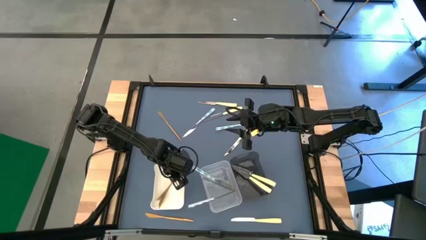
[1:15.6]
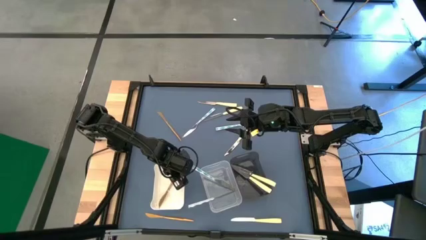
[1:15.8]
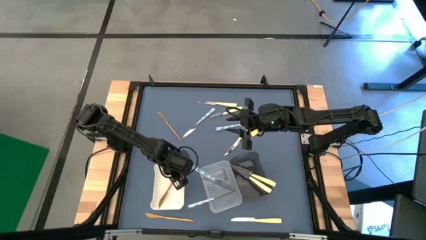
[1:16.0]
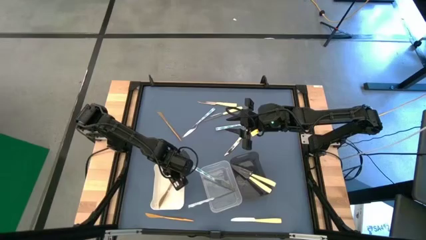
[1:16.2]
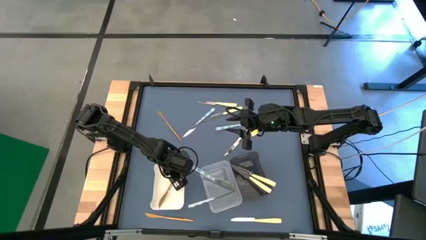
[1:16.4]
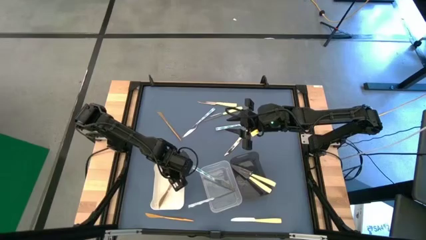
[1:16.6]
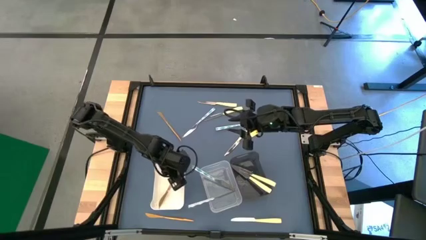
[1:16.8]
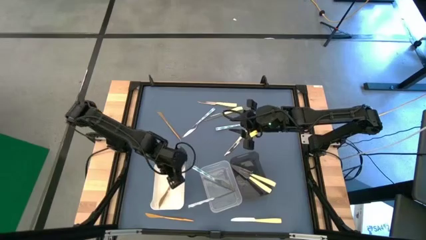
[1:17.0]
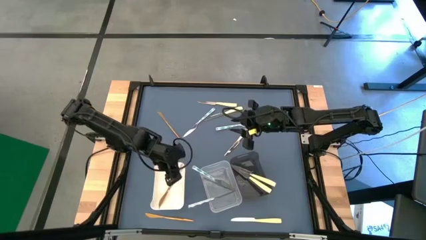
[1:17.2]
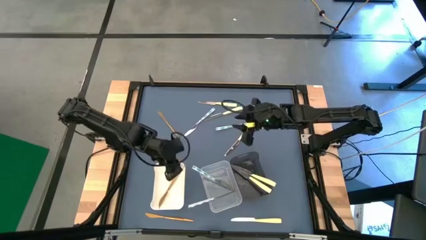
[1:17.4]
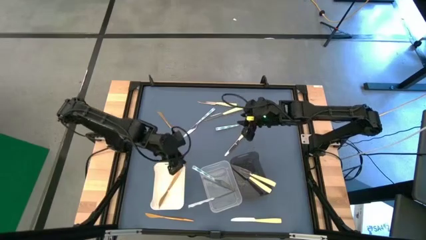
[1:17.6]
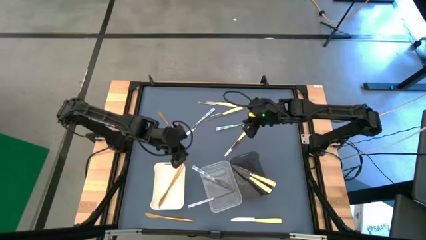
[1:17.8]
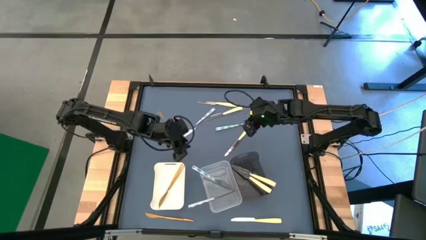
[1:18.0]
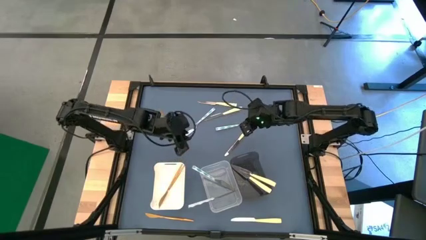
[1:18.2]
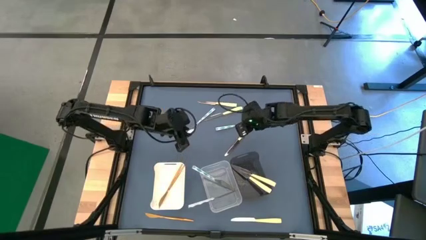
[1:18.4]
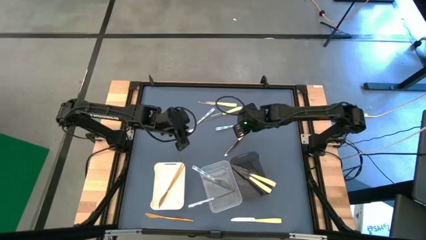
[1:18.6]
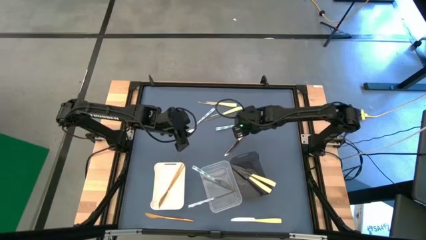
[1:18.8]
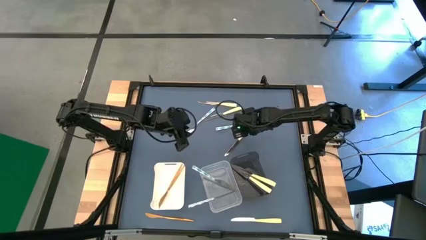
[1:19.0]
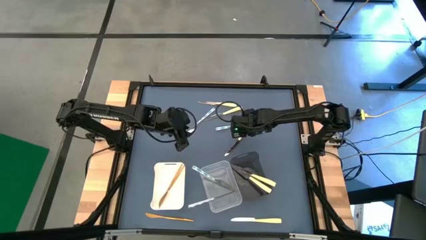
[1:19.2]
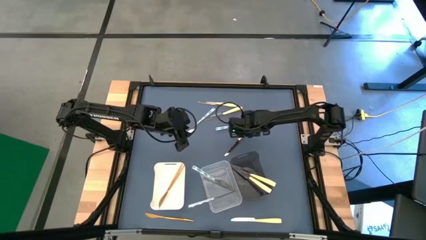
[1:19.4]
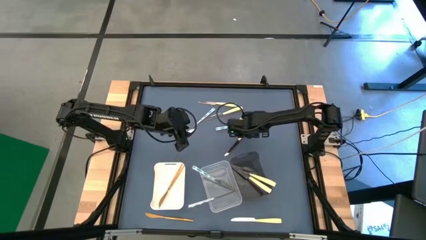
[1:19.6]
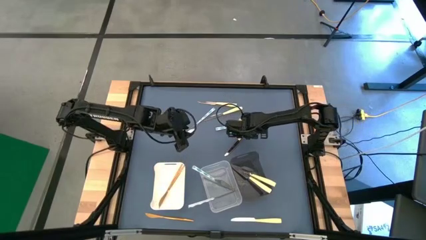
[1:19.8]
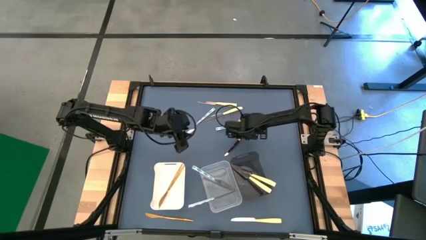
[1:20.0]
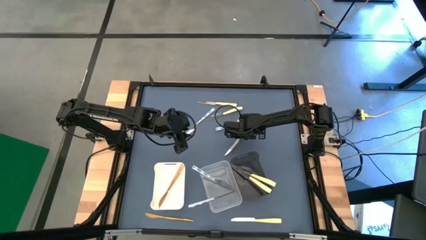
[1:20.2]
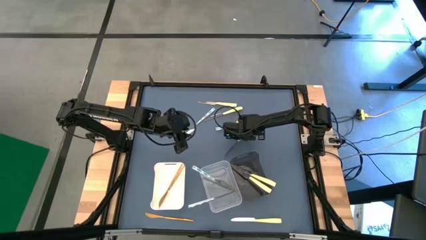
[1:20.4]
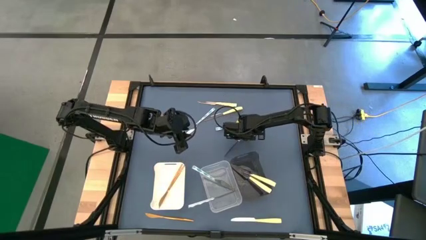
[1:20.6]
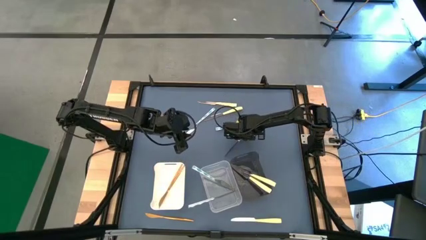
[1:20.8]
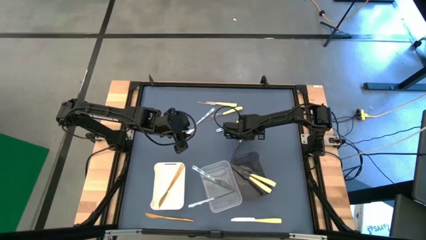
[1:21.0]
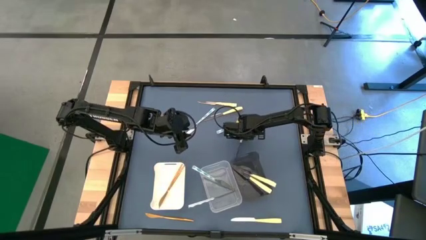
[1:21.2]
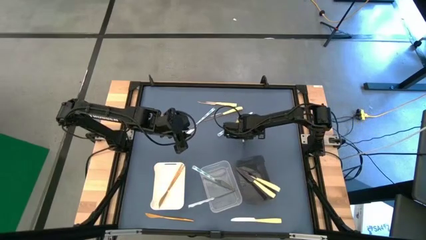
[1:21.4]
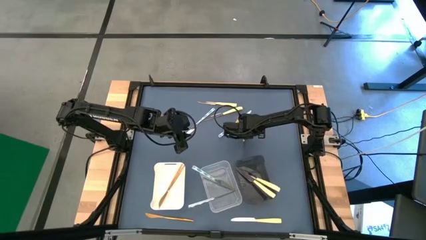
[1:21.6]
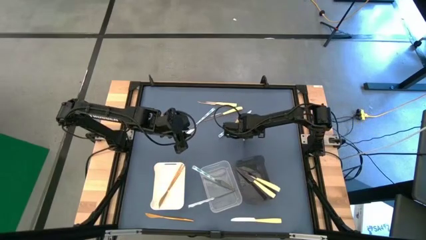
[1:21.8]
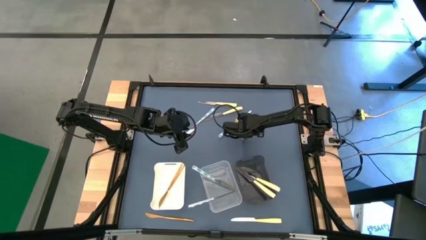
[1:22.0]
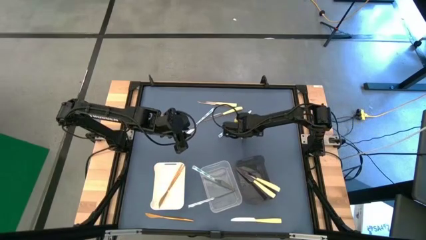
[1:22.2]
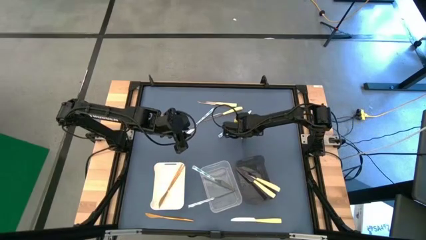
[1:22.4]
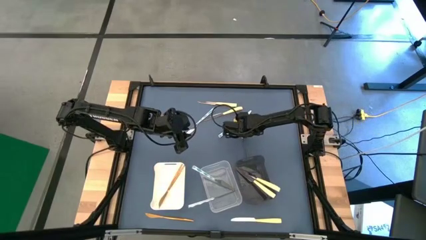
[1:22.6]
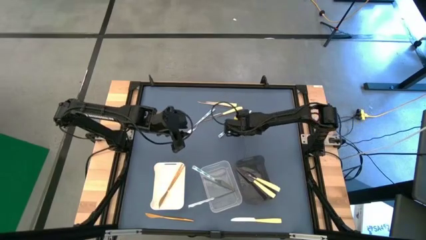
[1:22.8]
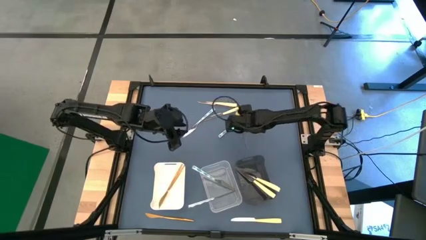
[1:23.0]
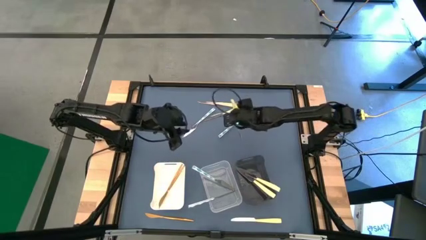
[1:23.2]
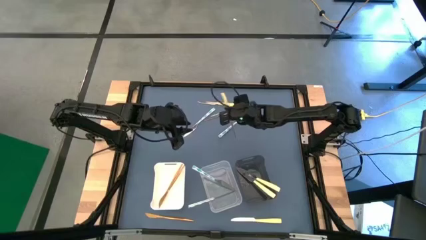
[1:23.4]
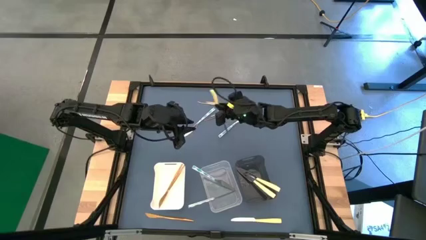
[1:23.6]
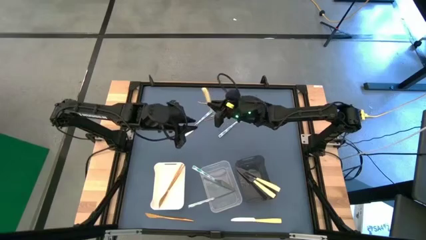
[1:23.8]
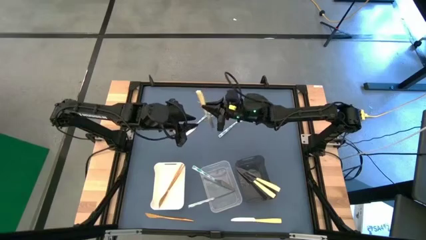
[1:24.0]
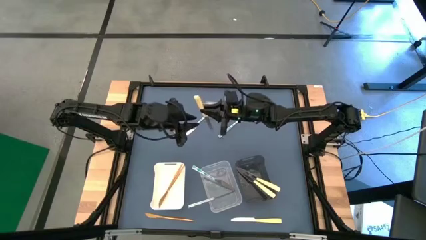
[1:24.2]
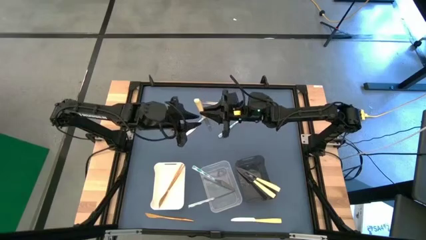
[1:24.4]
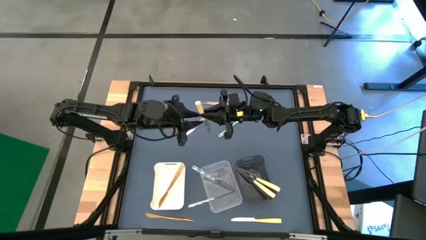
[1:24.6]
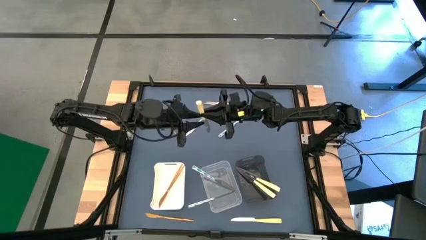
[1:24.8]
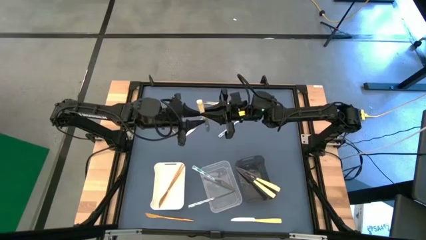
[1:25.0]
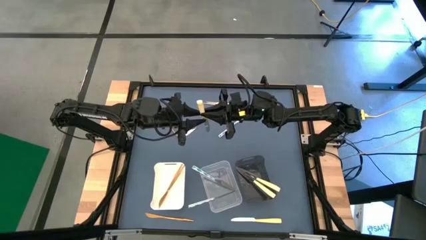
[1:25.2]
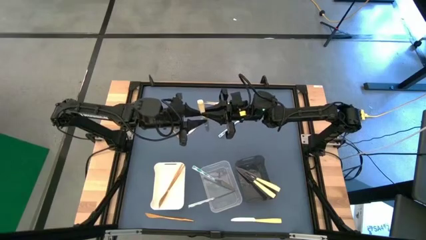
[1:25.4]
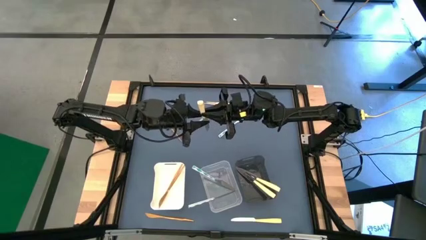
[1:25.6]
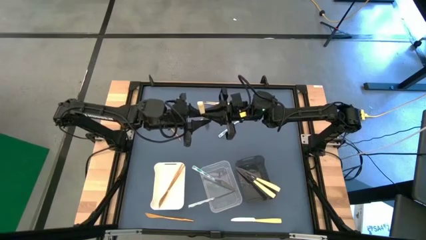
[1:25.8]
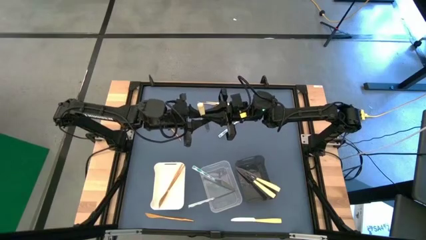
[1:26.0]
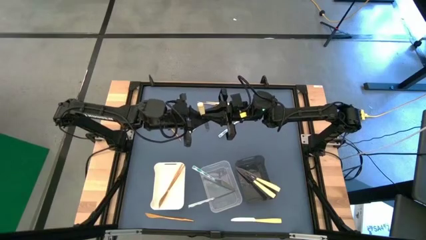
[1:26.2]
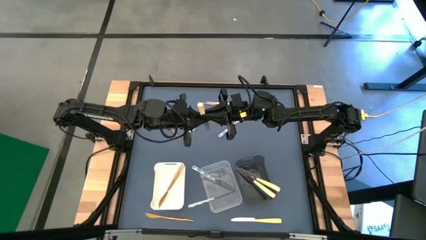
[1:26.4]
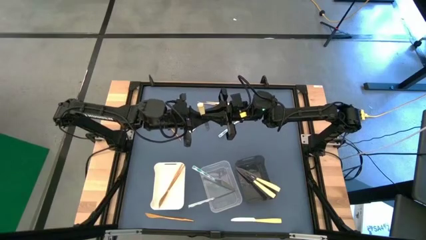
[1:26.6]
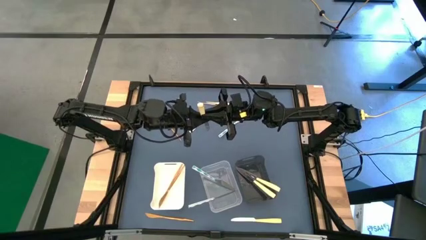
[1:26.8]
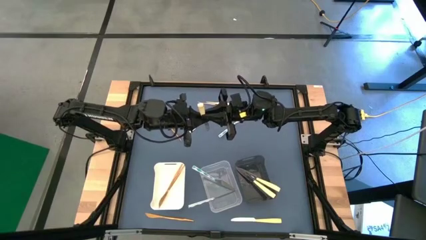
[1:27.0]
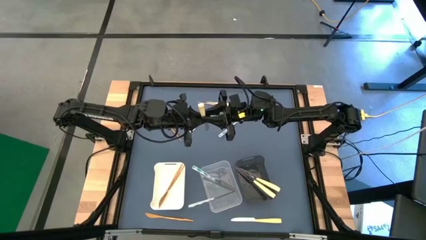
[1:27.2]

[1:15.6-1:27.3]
Task: Sort silverware by color (type)
Put the yellow table knife into the black transparent bin

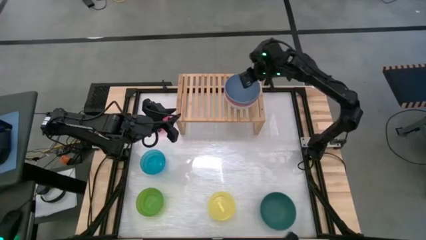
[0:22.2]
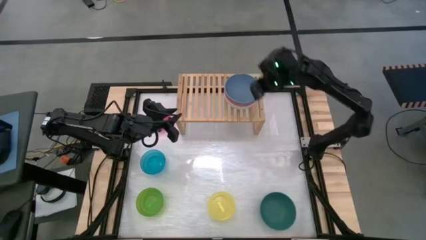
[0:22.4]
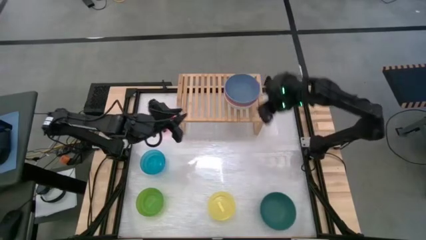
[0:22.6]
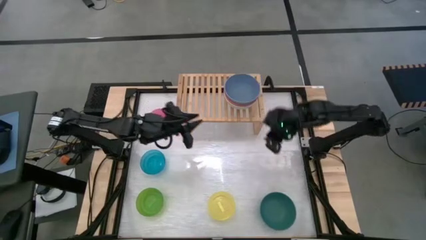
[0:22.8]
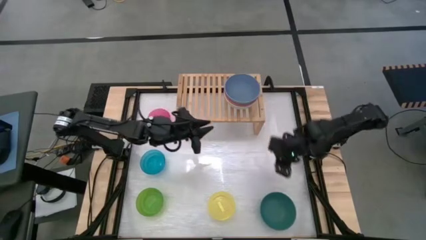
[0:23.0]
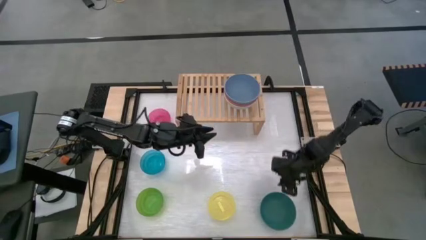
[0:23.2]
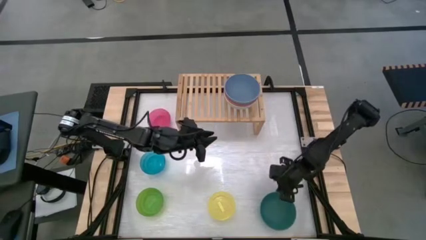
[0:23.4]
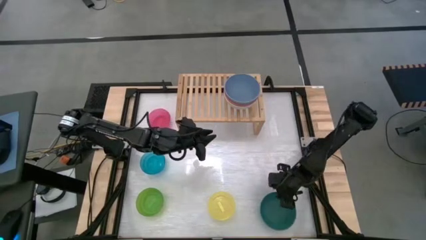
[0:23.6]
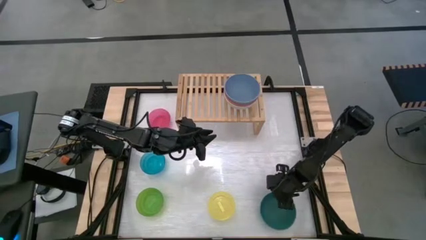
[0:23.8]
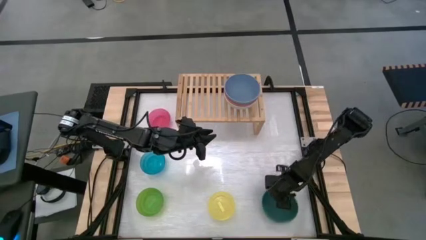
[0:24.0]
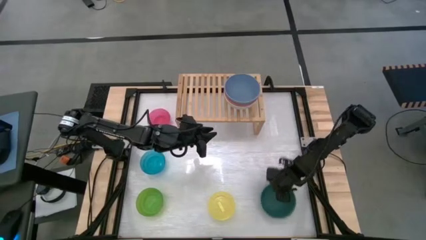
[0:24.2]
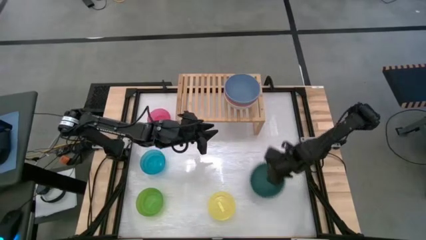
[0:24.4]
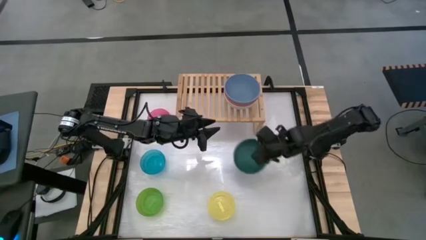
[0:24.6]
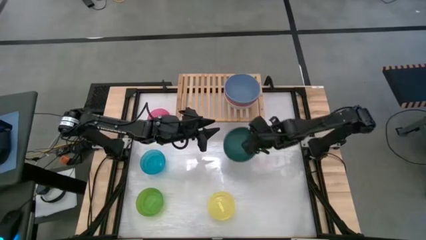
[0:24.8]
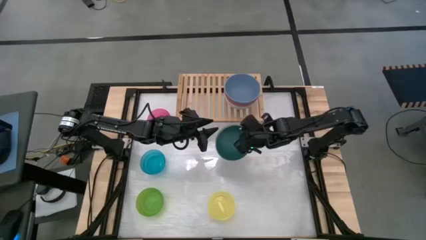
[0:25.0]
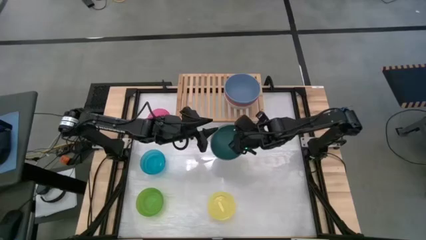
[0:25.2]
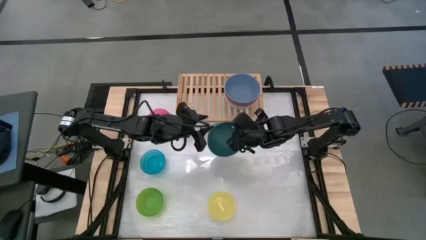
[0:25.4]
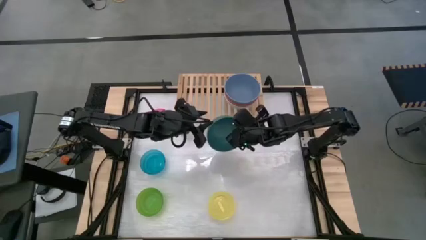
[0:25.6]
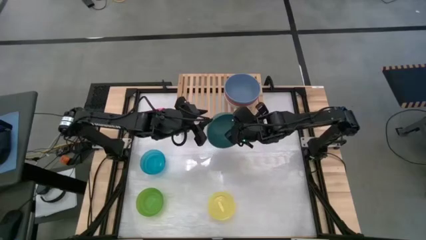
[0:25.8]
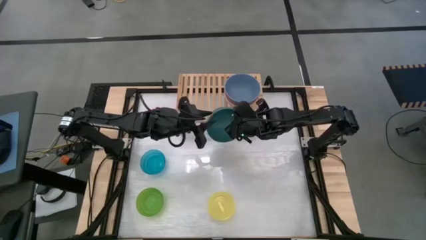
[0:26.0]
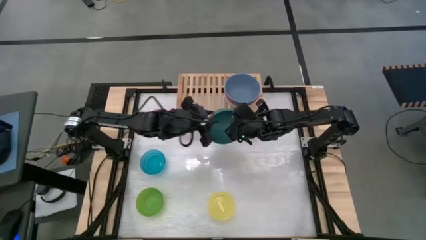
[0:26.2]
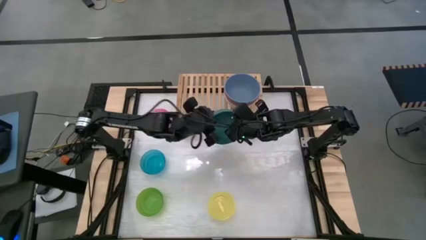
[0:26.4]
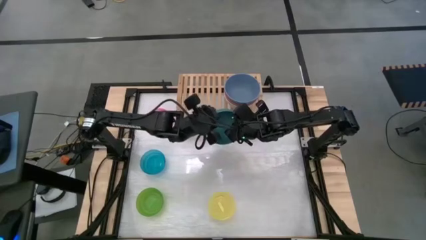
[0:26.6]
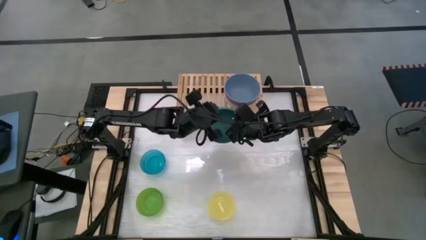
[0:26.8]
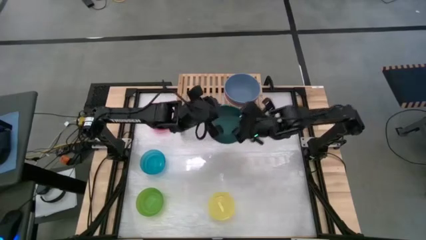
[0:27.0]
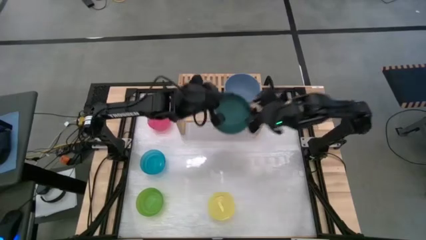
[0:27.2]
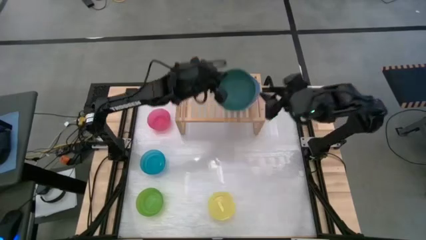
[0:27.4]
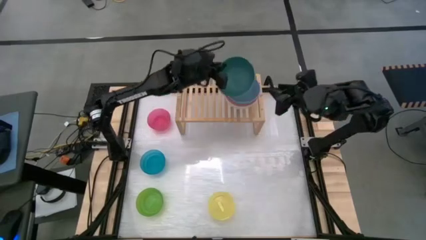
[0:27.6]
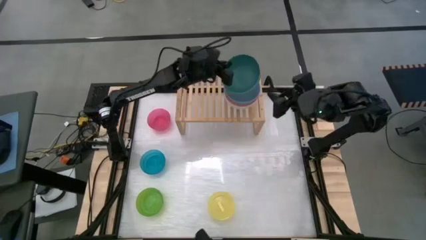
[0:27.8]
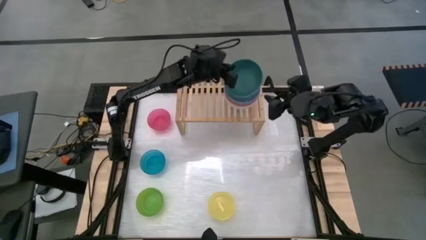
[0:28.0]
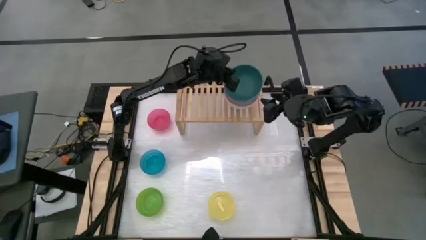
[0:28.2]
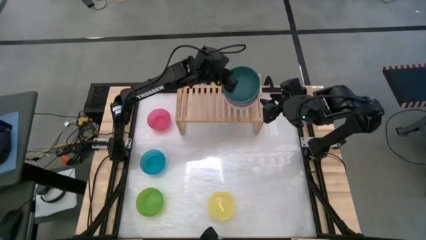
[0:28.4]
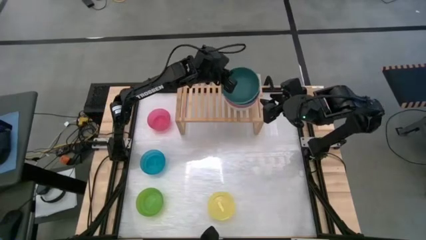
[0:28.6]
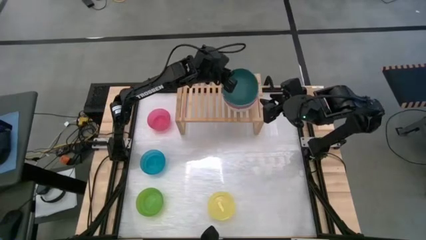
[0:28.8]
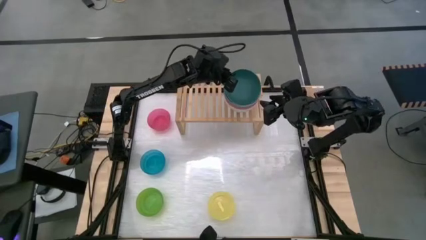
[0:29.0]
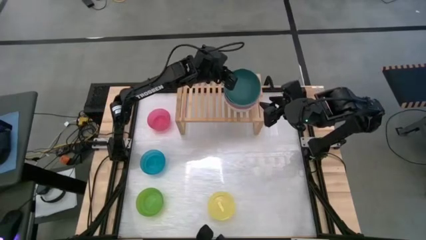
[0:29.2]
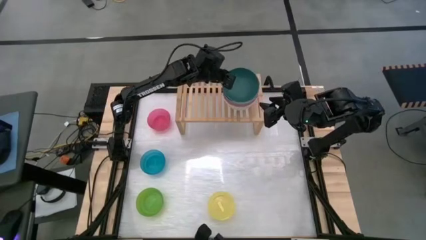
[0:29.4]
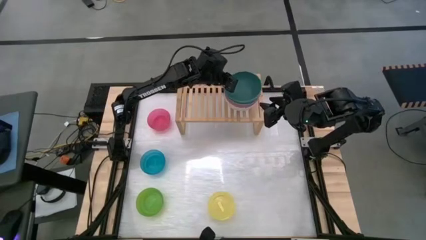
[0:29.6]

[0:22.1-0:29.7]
Task: Place and stack bowls onto a shelf
Stack the large dark green bowl on the stack bowls on the shelf
